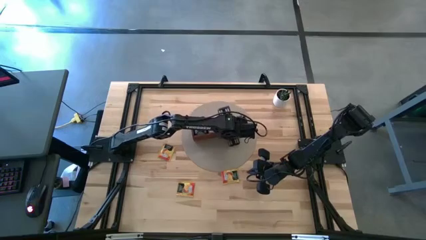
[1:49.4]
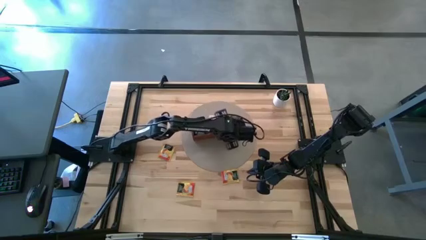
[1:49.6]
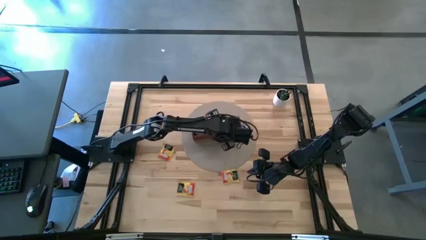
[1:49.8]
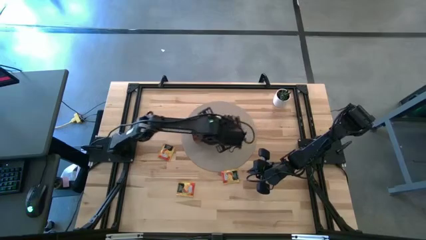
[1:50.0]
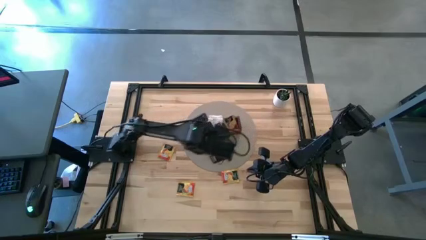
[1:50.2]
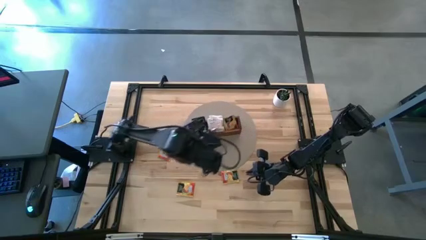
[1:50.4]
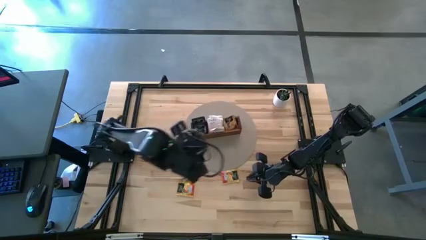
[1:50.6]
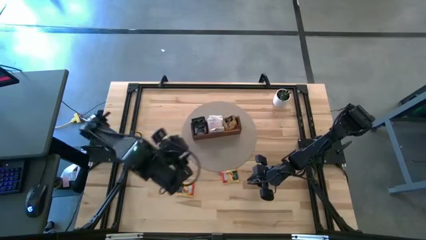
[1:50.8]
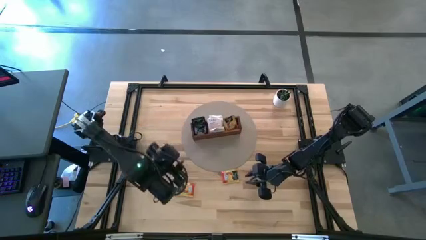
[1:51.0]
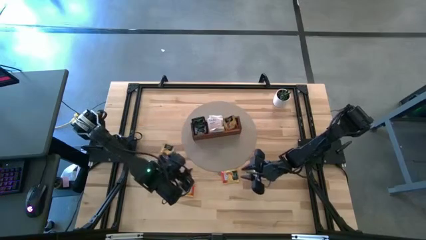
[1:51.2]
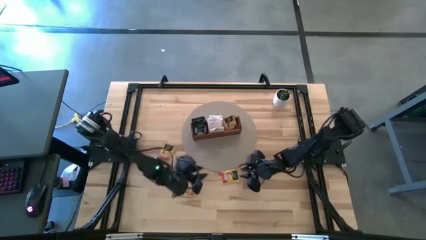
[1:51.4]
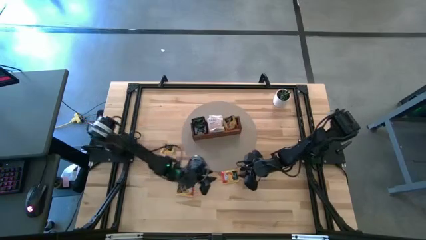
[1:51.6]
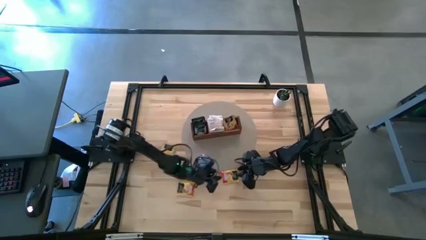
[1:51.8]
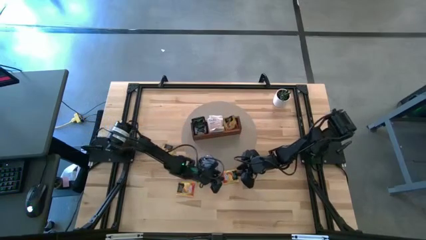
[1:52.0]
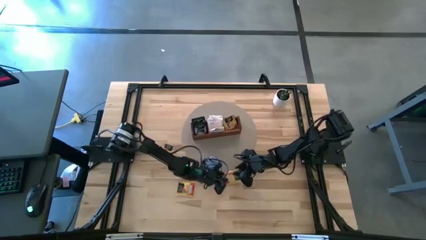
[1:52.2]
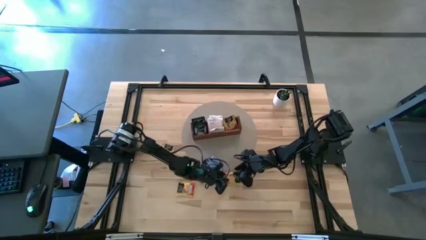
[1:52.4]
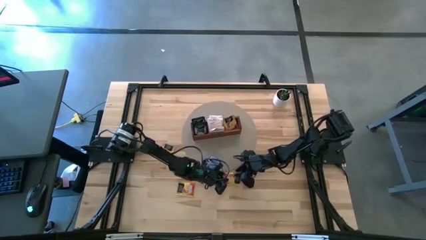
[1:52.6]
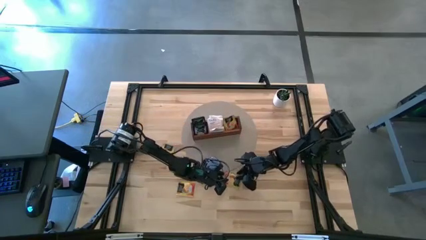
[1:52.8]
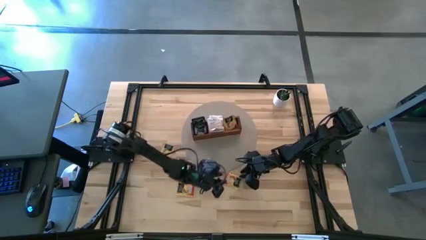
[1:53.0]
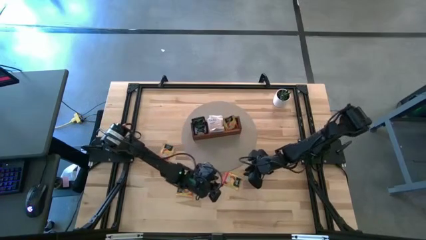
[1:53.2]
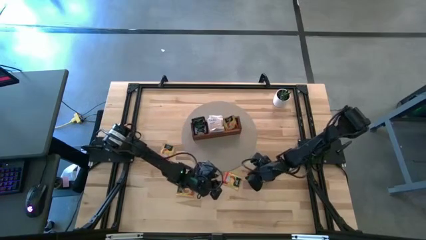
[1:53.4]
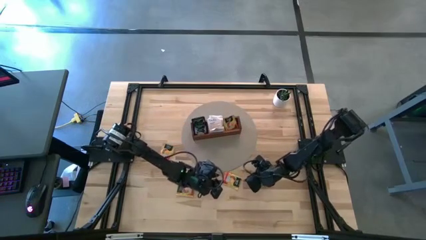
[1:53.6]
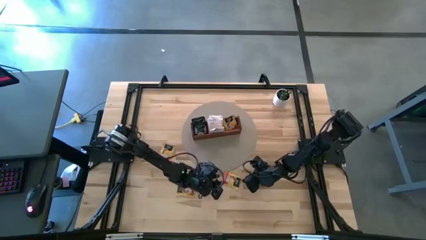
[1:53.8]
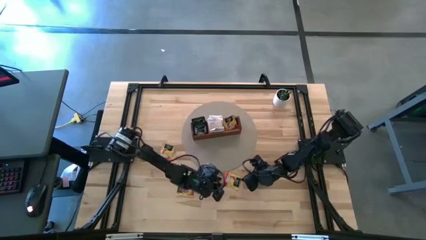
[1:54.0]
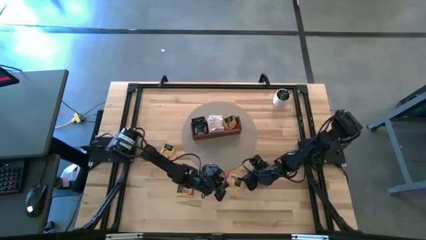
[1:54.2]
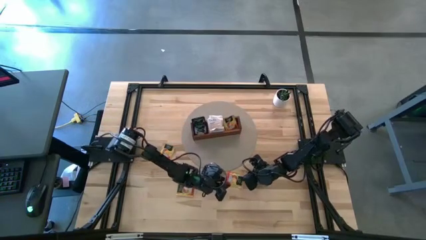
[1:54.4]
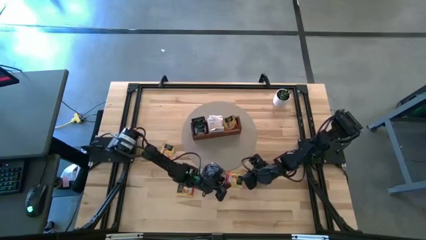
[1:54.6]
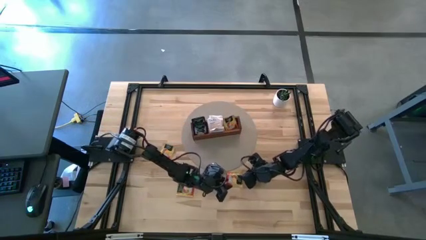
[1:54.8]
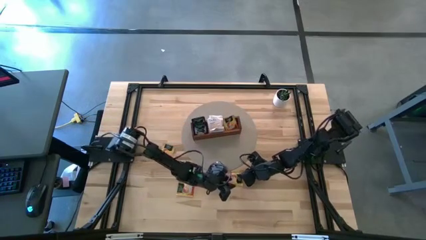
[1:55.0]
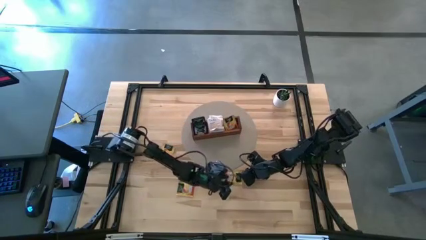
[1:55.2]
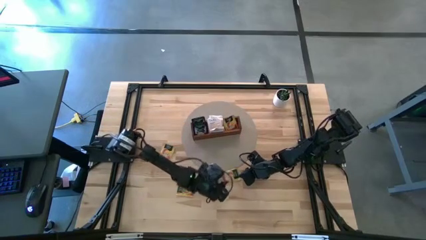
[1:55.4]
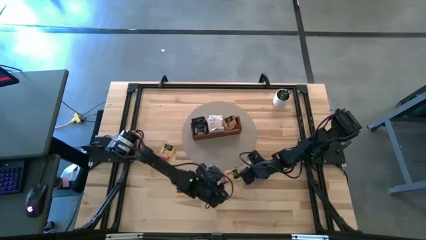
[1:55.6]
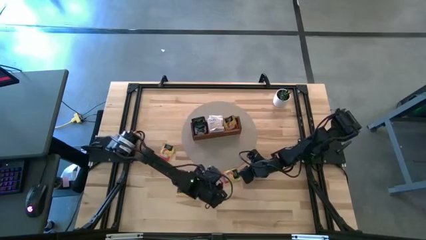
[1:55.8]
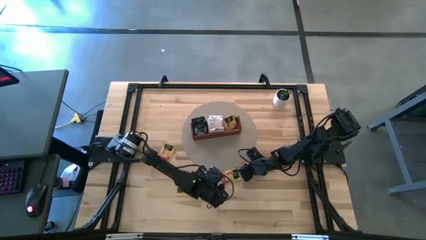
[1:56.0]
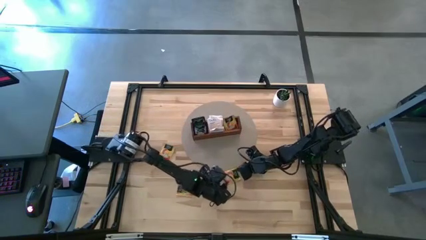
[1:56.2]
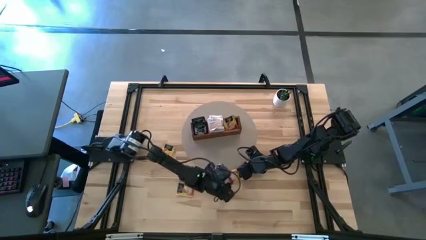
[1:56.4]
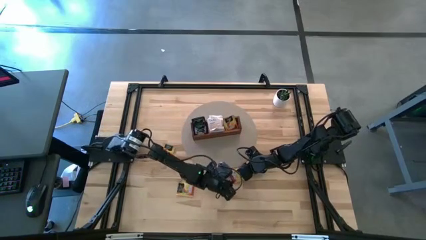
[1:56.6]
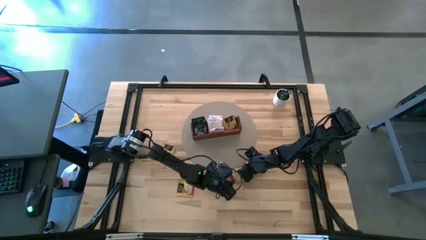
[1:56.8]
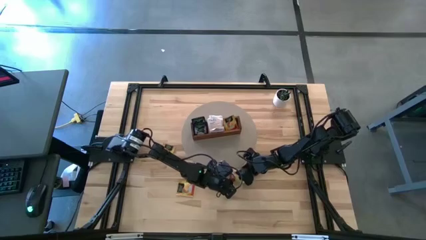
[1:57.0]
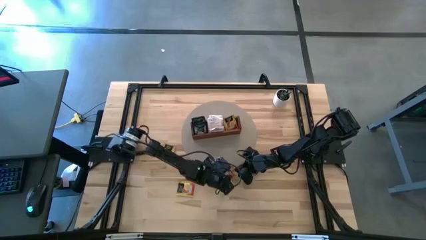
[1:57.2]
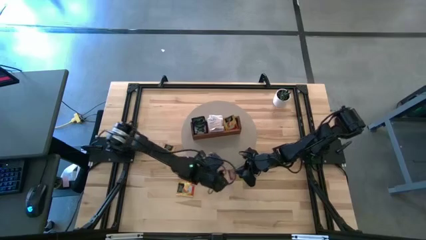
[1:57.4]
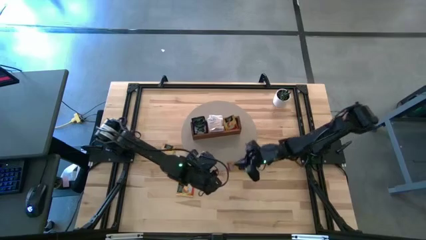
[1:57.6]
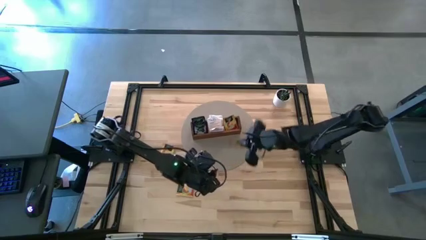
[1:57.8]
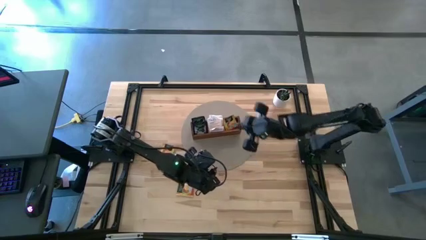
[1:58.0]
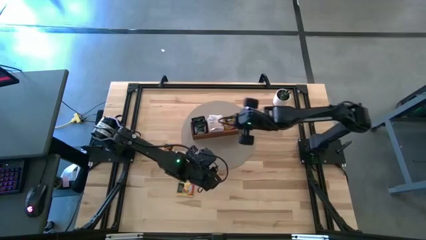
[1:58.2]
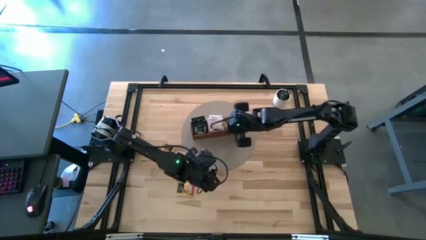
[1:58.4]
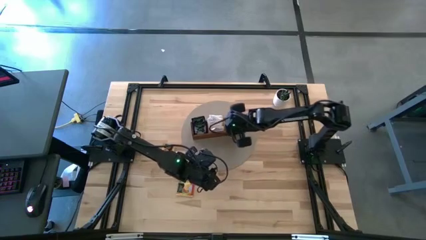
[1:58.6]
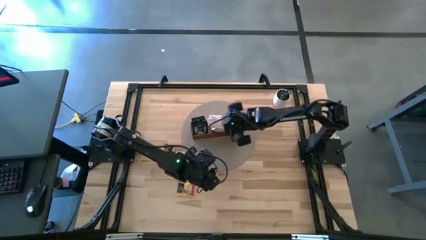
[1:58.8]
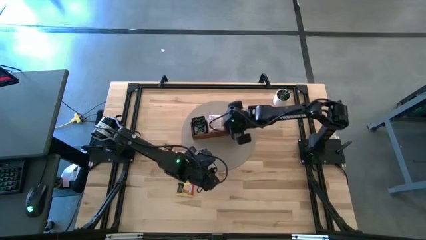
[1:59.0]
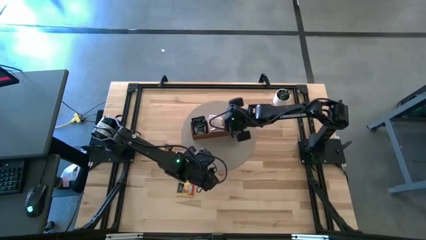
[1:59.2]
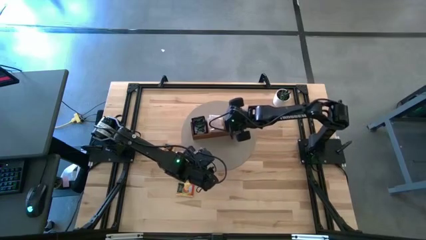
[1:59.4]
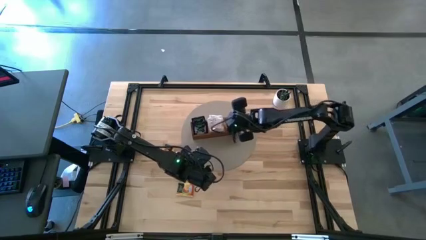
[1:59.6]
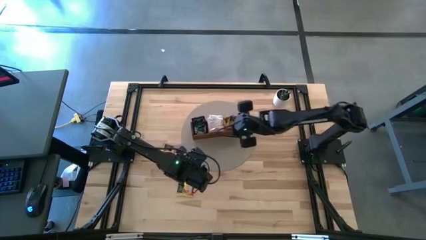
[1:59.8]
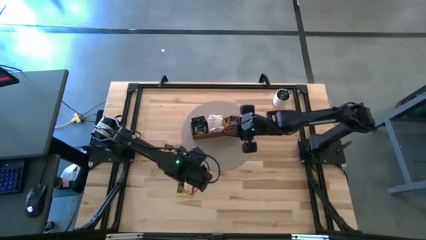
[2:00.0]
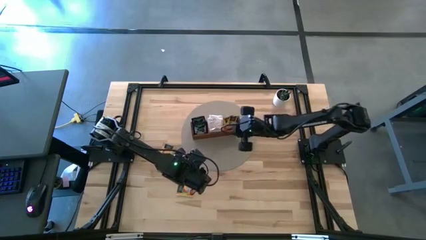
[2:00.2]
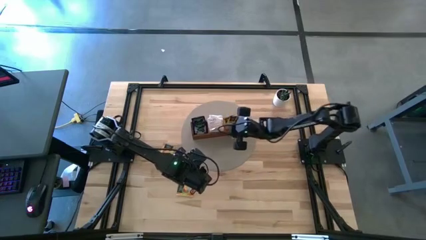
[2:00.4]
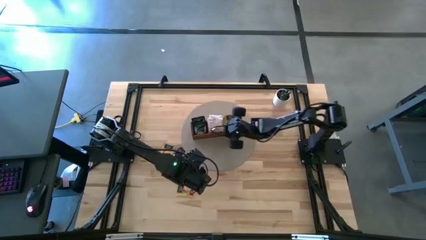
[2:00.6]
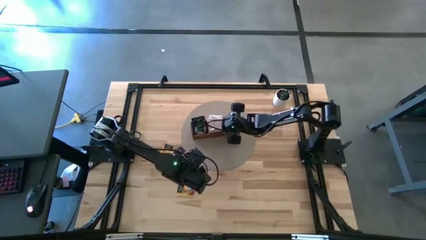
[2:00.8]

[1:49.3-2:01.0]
Task: Pick & Place Tea
Put the yellow tea bag into the right section of the wooden organizer

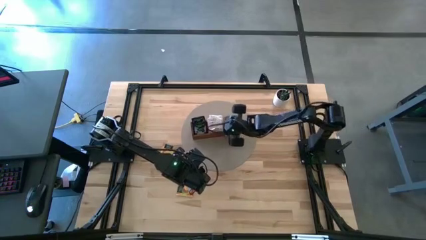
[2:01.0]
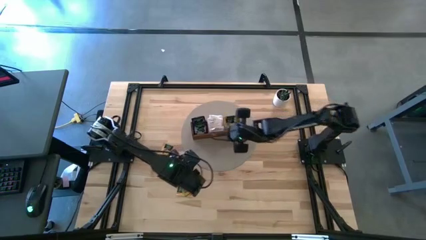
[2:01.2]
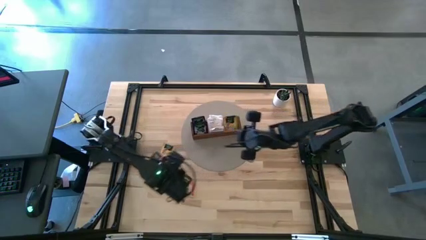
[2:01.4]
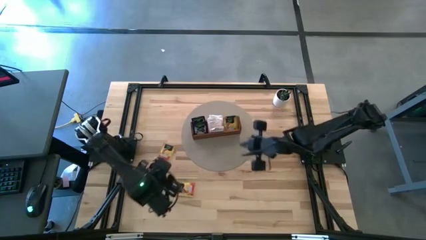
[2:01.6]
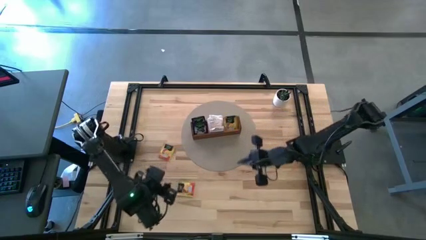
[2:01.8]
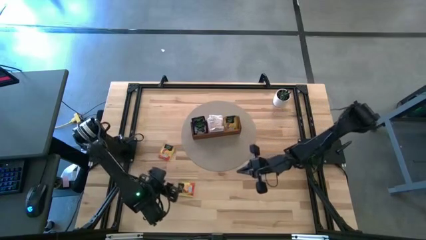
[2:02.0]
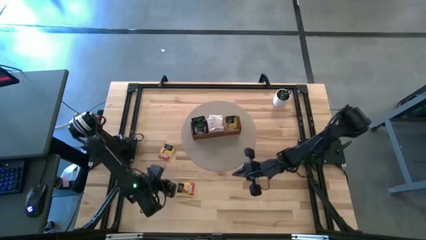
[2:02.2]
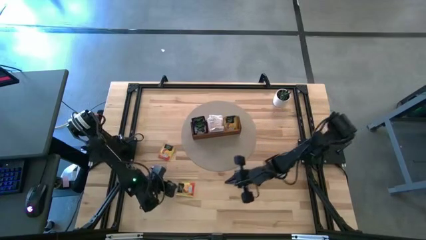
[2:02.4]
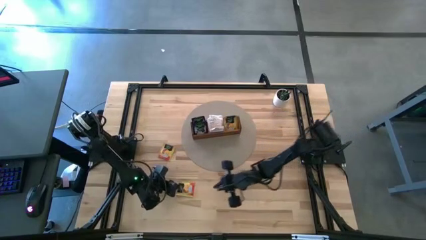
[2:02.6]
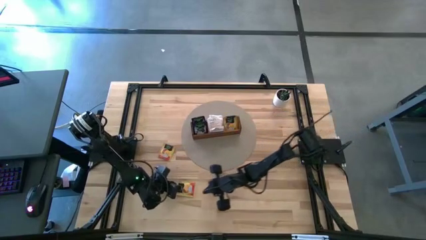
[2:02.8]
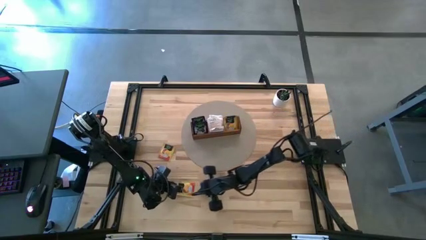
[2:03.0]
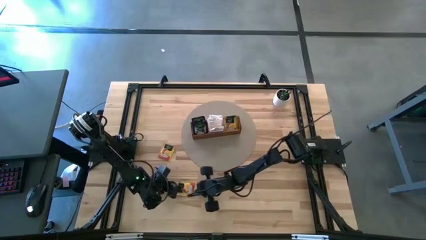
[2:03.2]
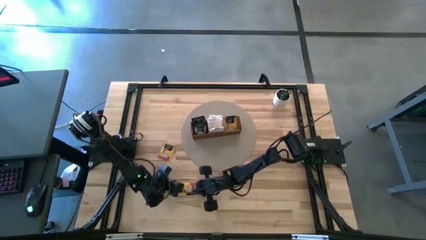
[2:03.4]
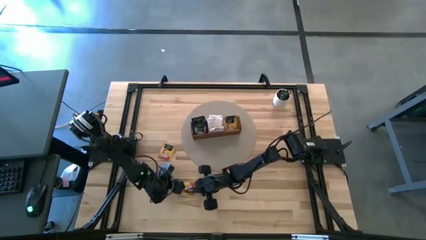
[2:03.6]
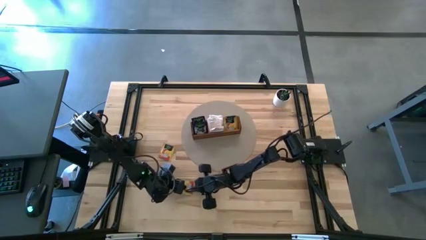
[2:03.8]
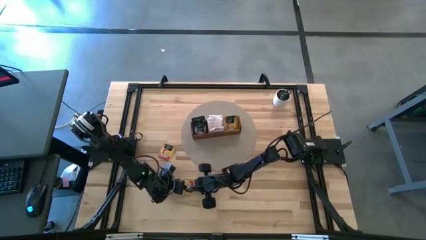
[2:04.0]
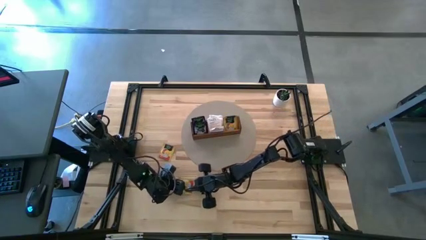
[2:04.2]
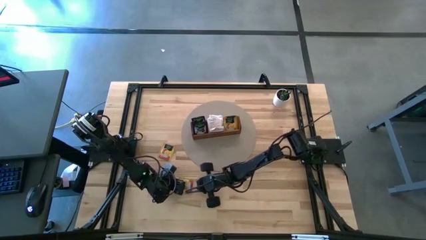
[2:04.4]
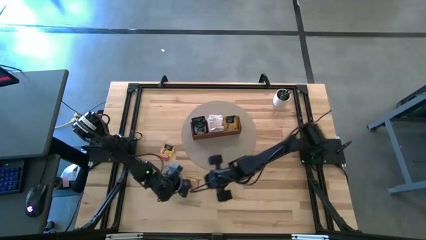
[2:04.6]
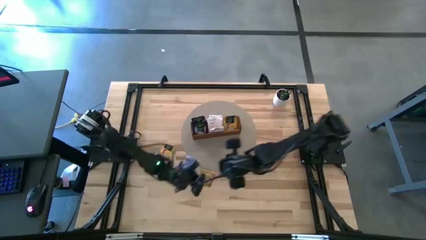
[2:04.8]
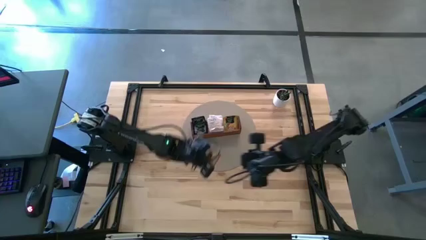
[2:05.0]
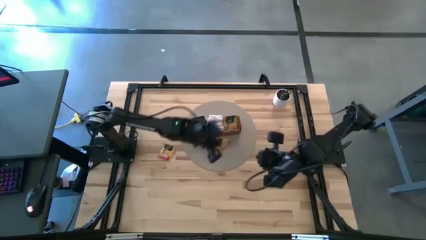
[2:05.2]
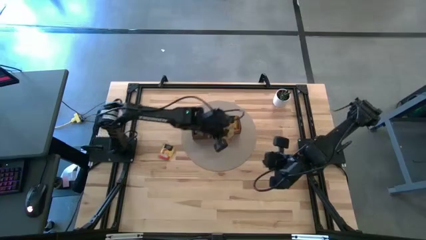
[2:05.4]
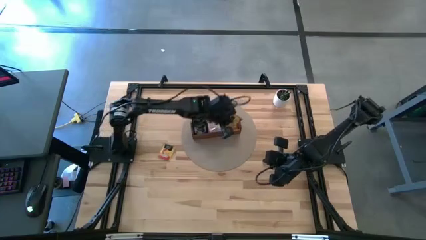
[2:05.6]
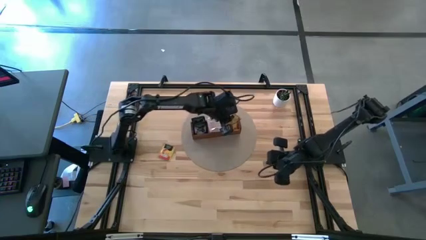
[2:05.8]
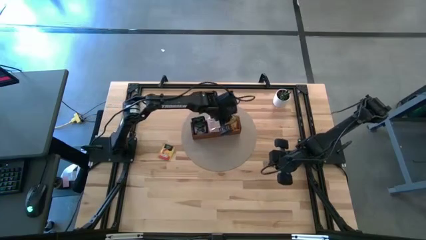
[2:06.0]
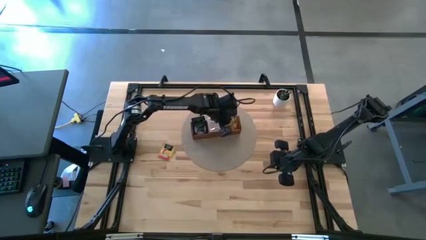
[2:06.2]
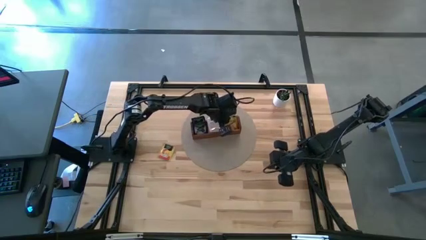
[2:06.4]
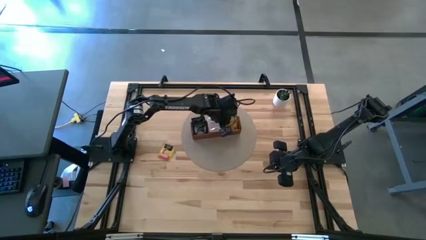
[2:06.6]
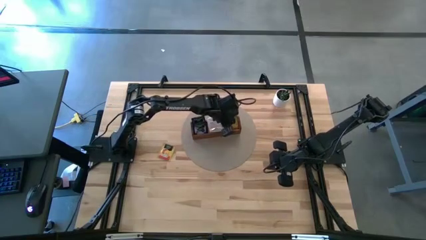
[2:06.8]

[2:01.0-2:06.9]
Put the yellow tea bag into the right section of the wooden organizer
